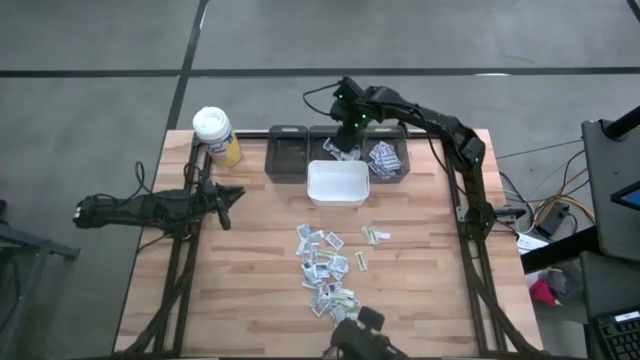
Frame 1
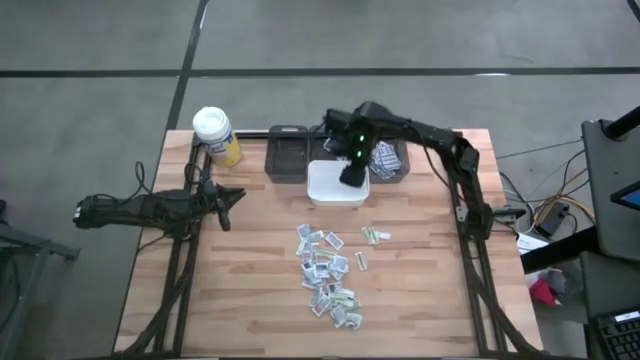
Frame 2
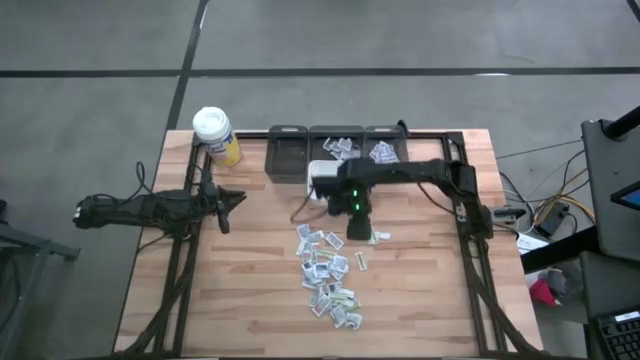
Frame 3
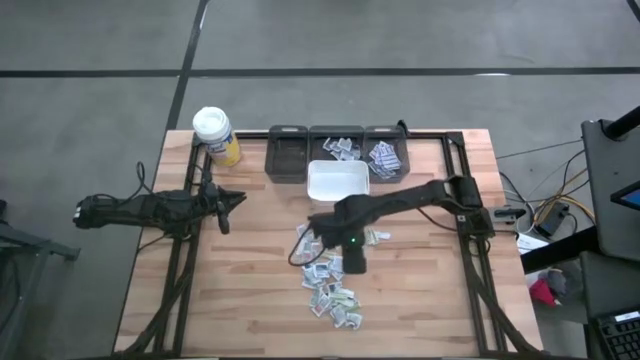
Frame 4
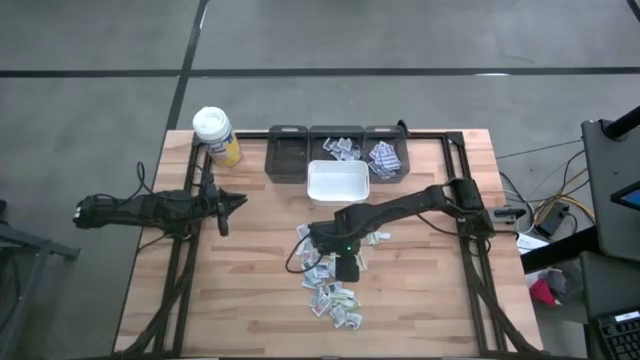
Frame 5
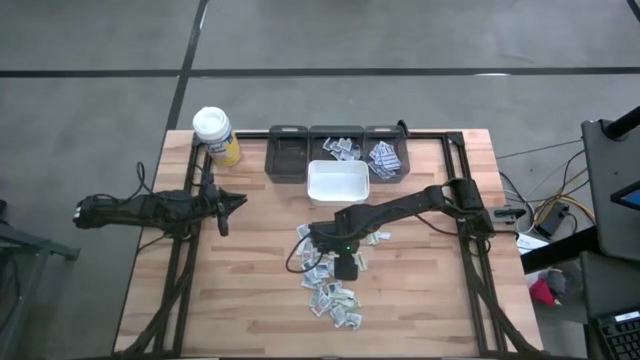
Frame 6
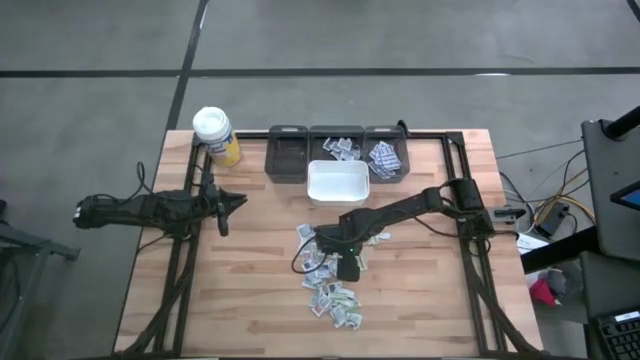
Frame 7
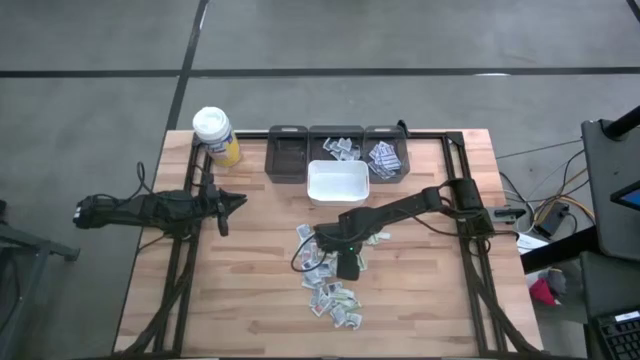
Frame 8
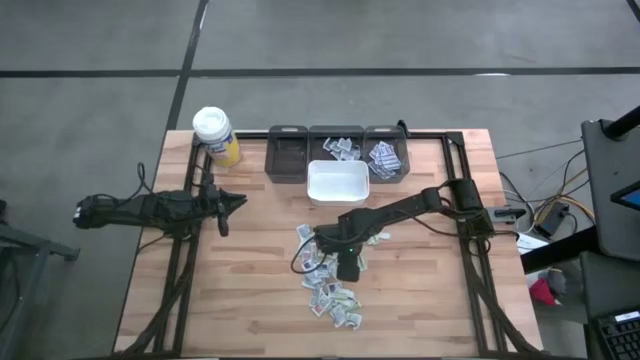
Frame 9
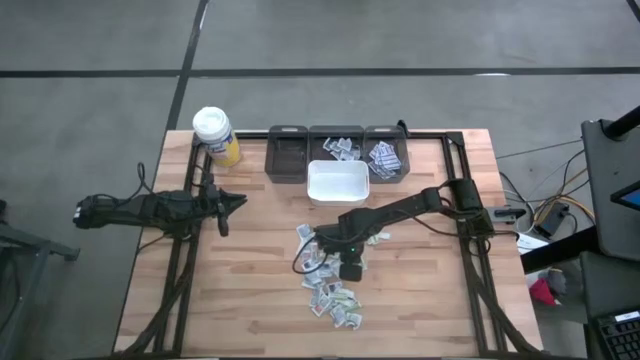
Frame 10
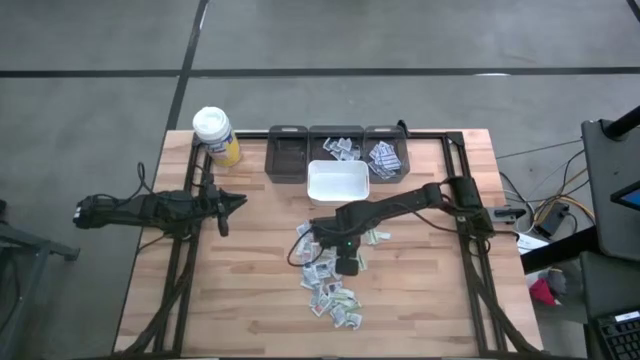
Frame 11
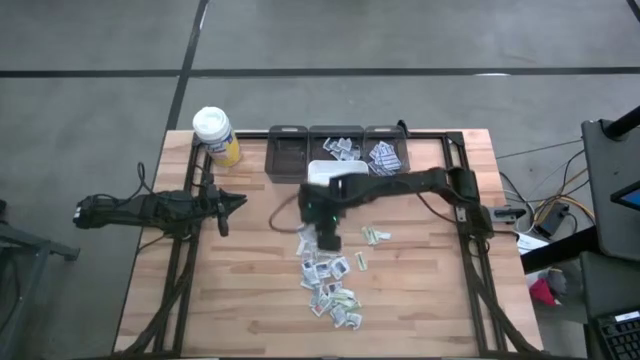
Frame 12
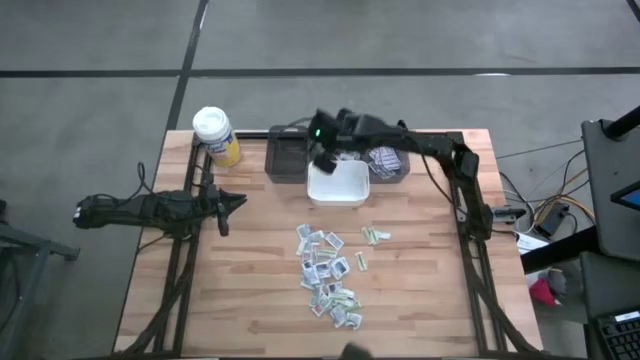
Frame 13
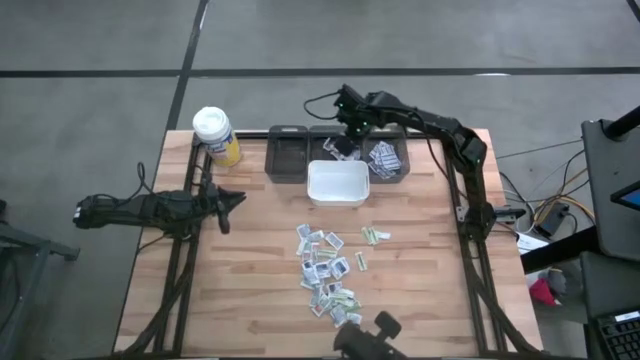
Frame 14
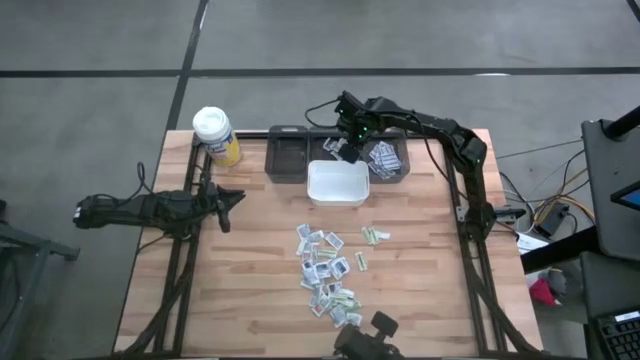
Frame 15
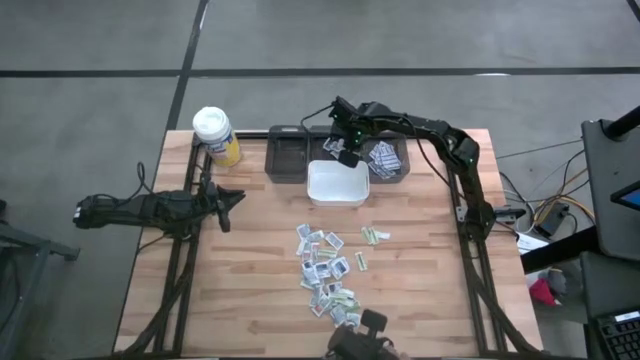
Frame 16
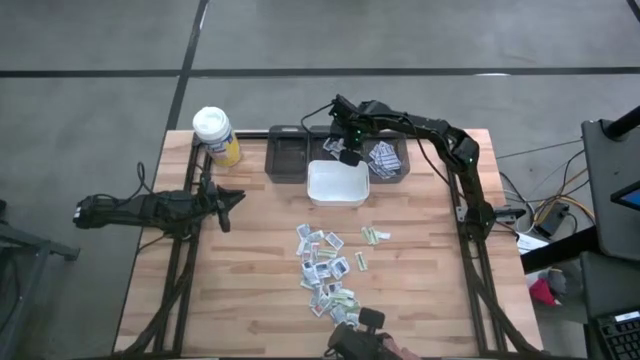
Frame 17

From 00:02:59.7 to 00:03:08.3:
Task: Pick & Place First Aid Supplies
Put the alcohol pad into the middle black bin

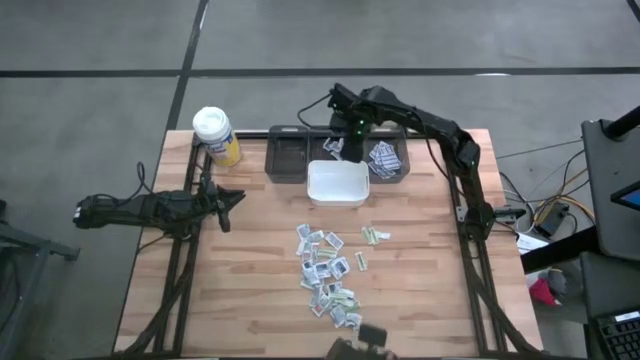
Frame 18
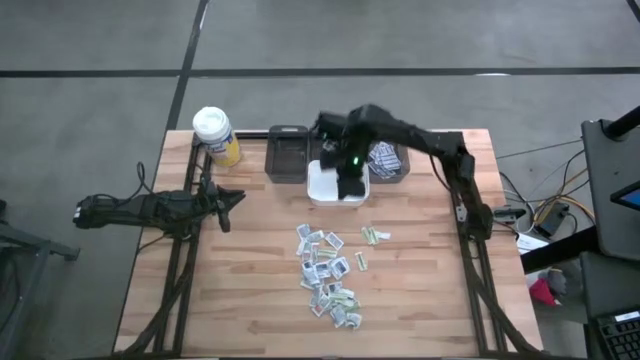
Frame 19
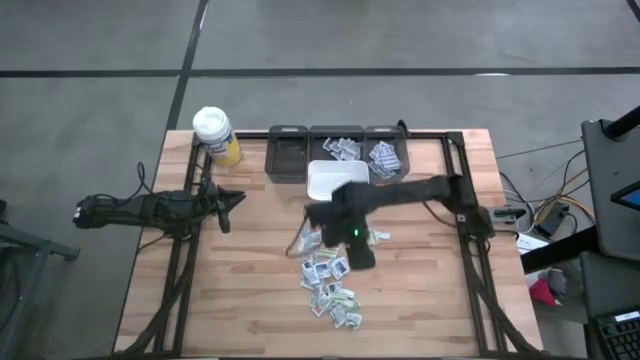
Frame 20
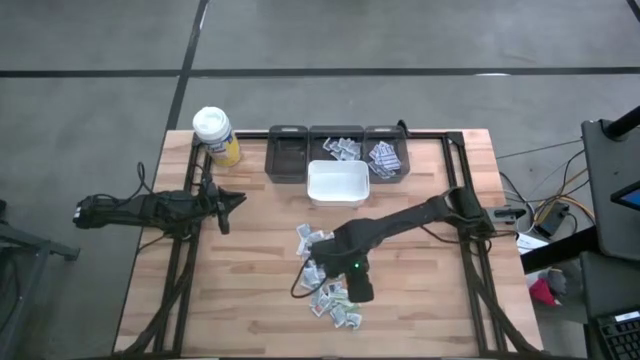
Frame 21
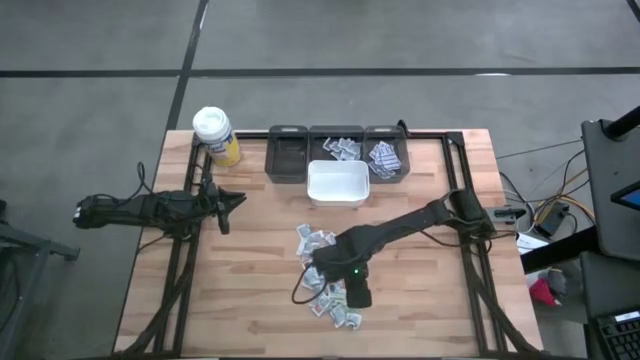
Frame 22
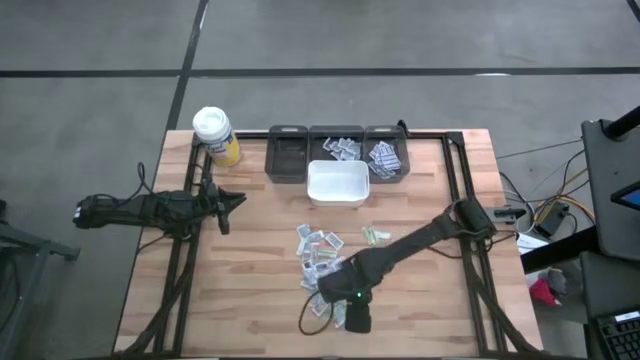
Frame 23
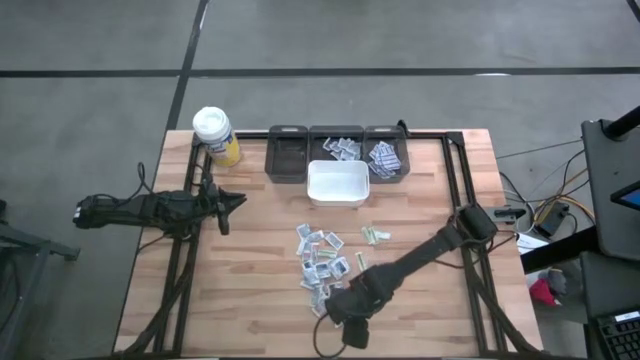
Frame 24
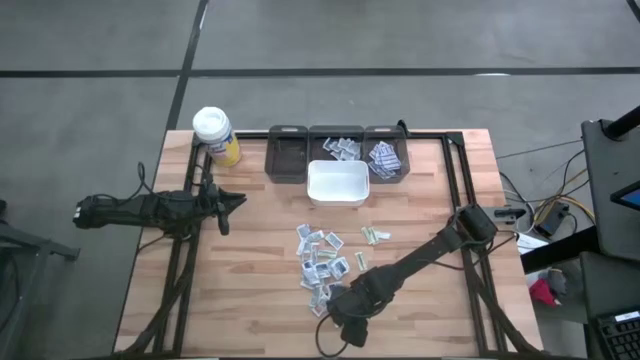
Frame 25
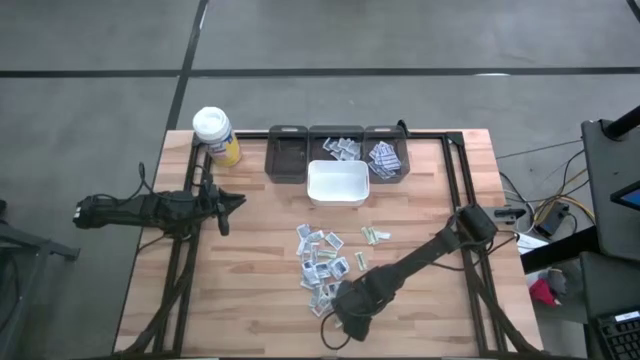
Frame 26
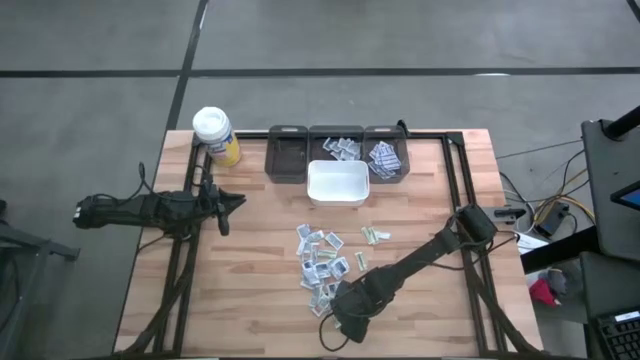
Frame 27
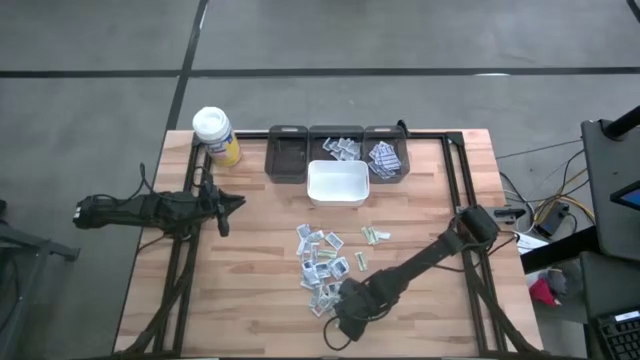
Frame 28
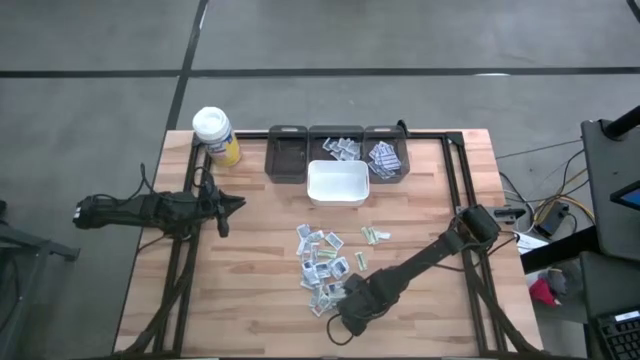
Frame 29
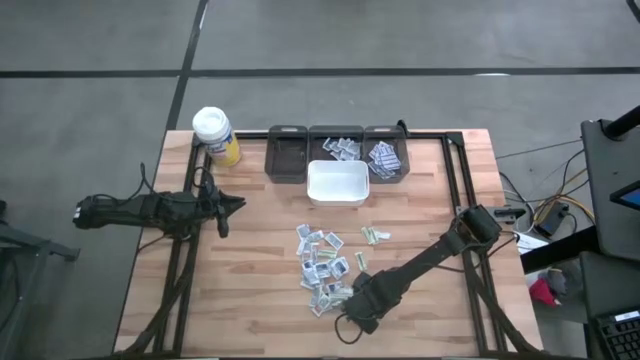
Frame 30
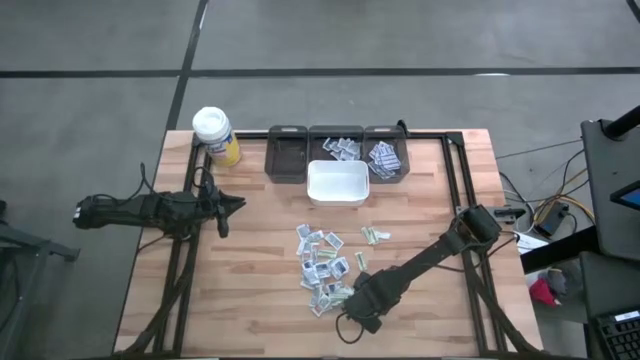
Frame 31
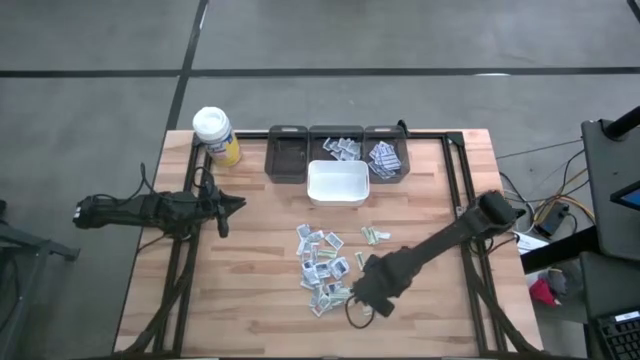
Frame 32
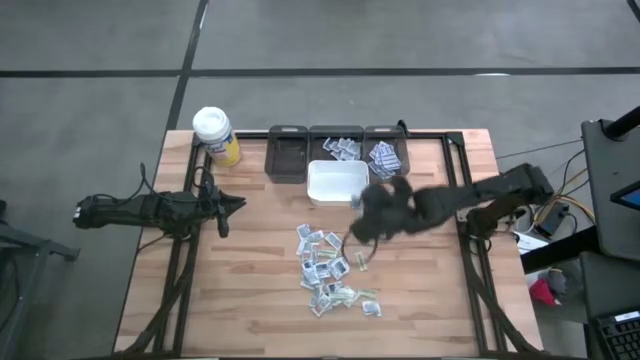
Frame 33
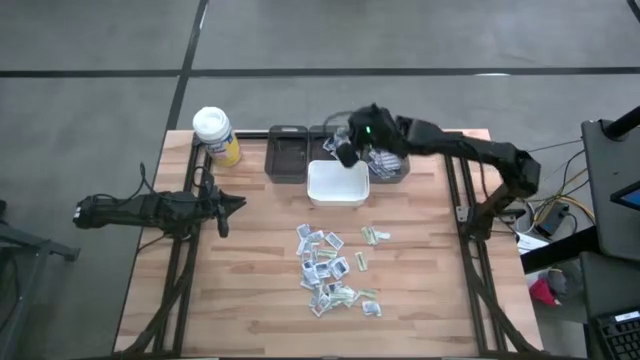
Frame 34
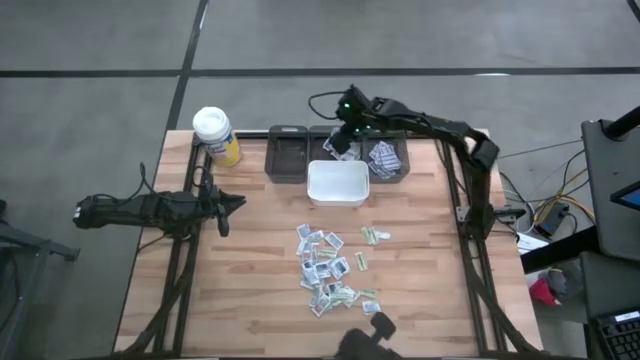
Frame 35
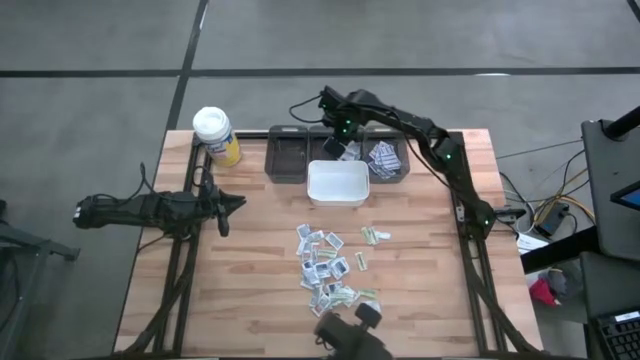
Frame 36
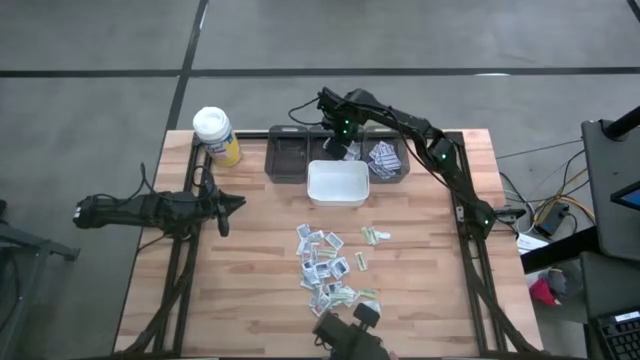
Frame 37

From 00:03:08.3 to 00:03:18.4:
Put the alcohol pad into the middle black bin

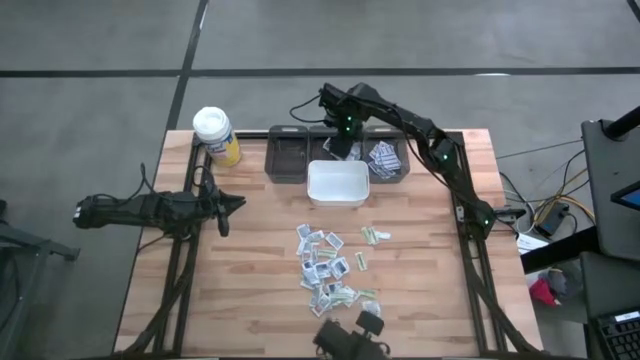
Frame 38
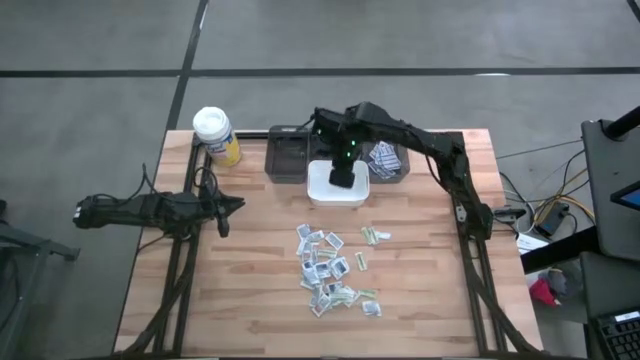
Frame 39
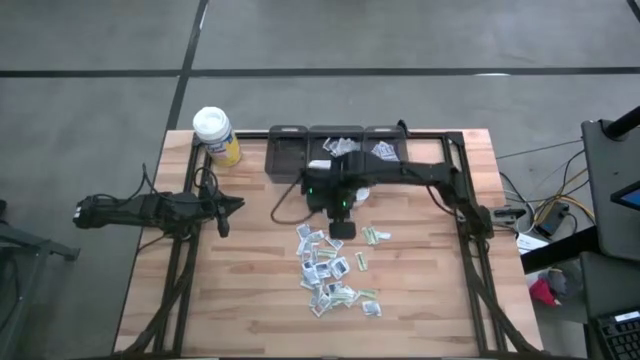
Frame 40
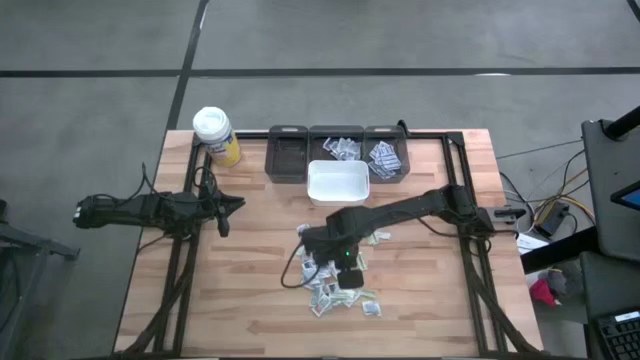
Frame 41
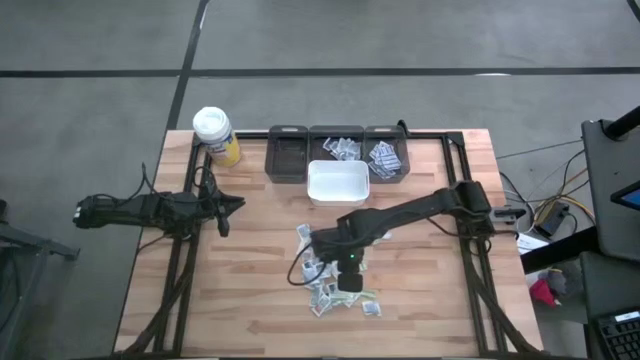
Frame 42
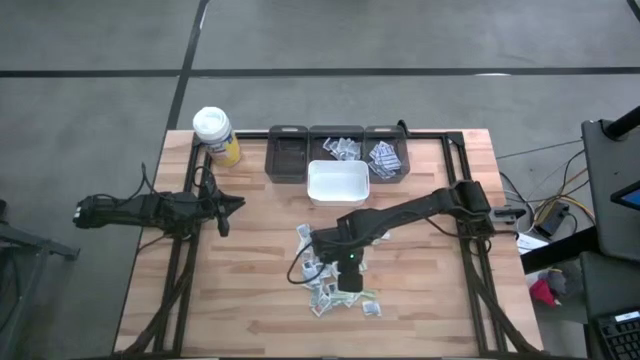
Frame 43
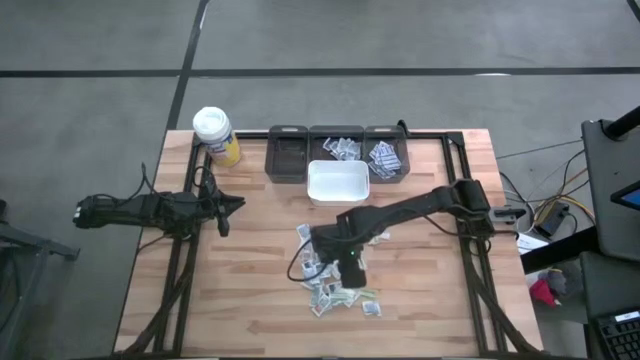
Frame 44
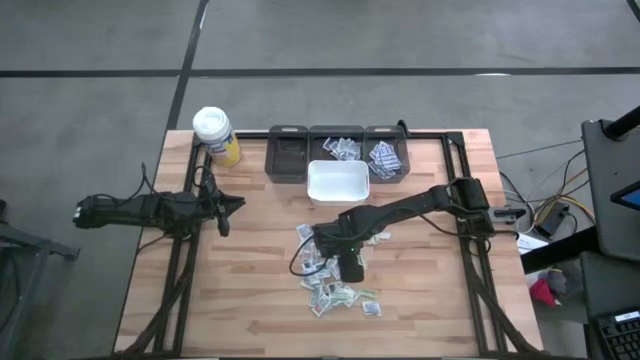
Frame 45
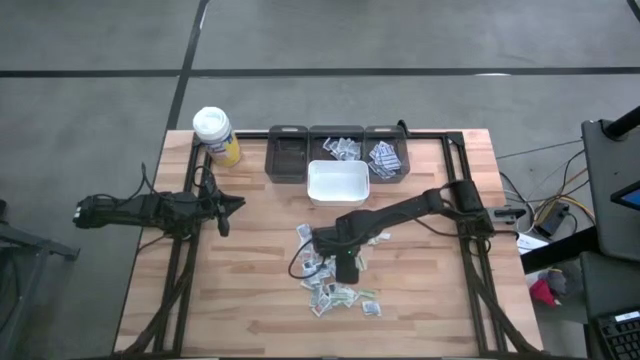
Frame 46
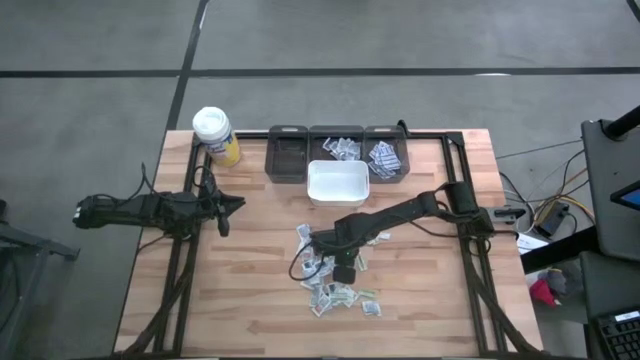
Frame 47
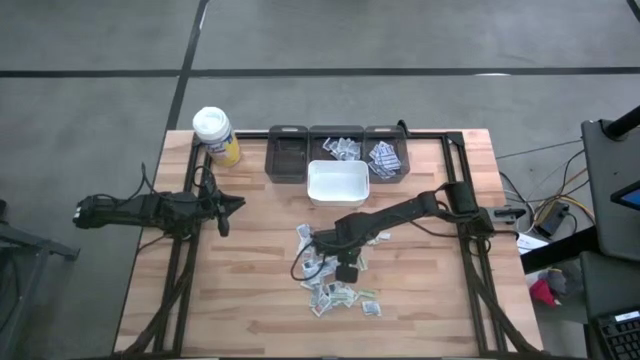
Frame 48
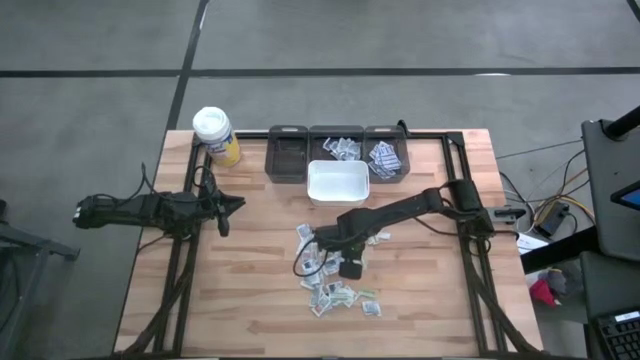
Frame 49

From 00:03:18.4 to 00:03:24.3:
Put the alcohol pad into the middle black bin
